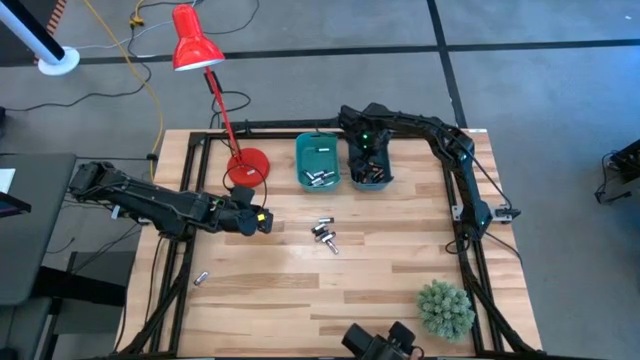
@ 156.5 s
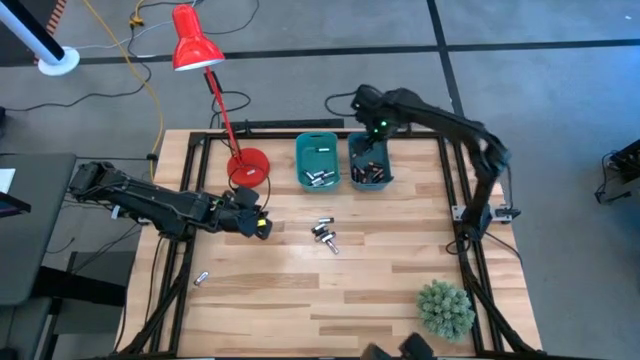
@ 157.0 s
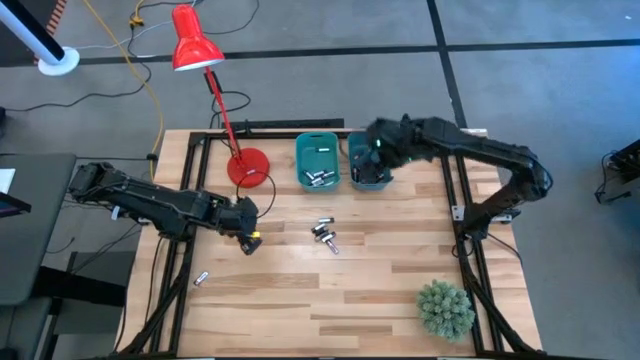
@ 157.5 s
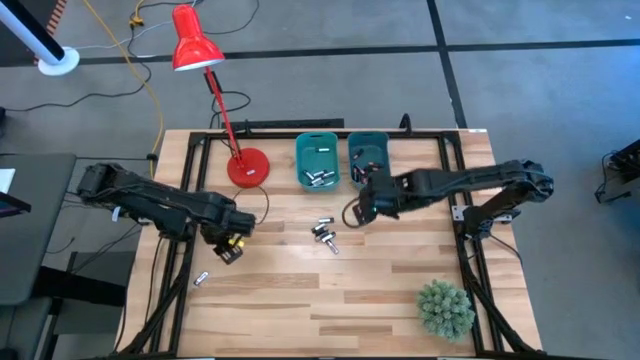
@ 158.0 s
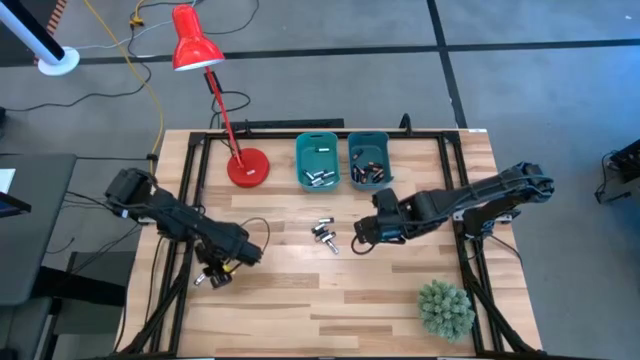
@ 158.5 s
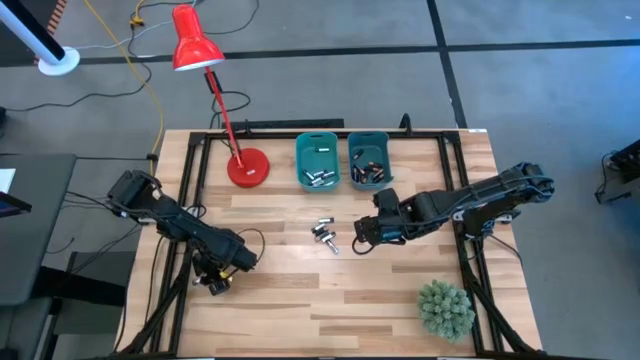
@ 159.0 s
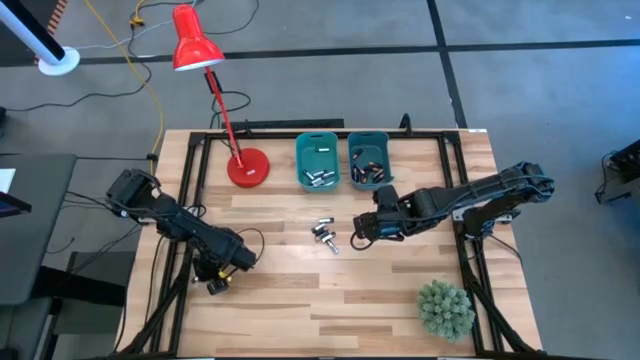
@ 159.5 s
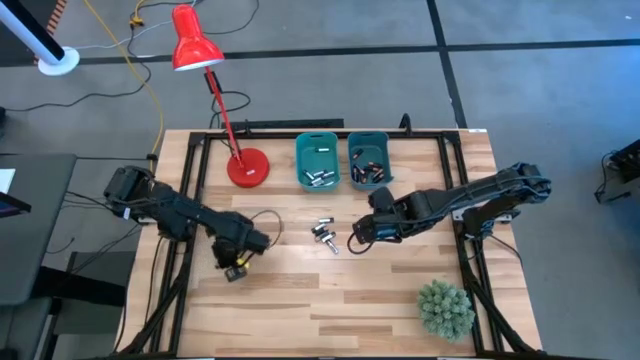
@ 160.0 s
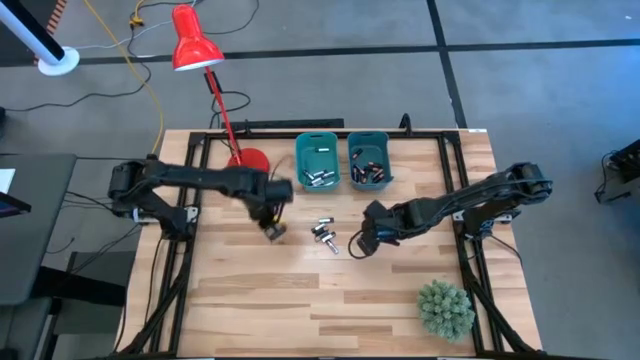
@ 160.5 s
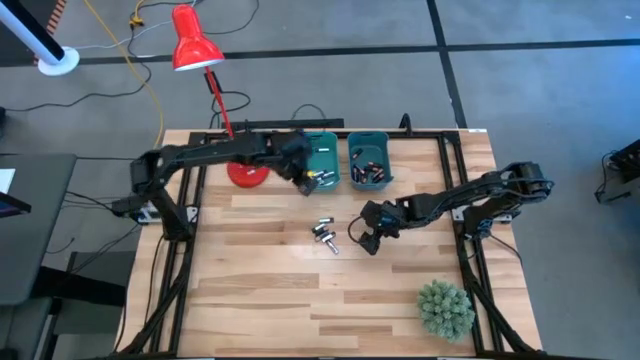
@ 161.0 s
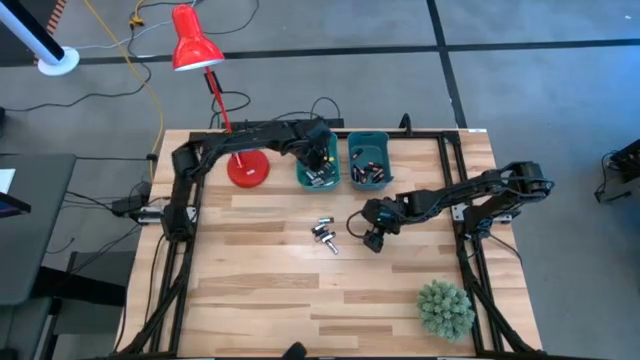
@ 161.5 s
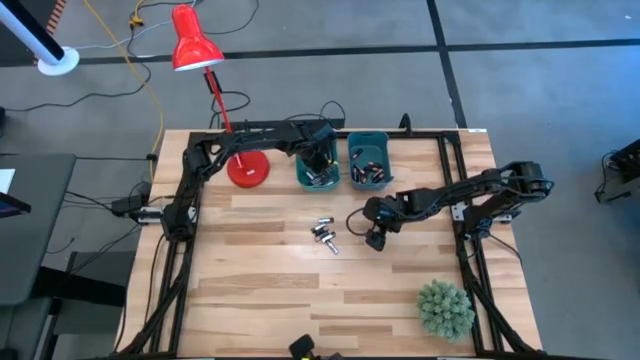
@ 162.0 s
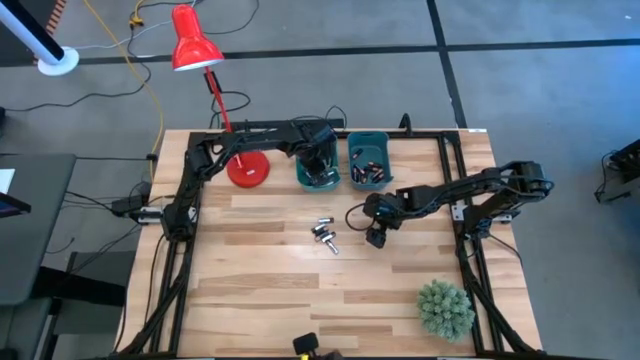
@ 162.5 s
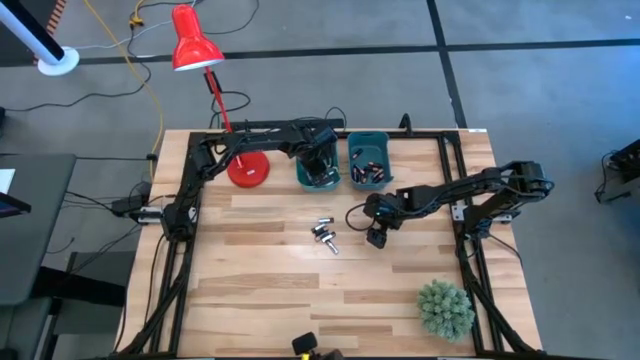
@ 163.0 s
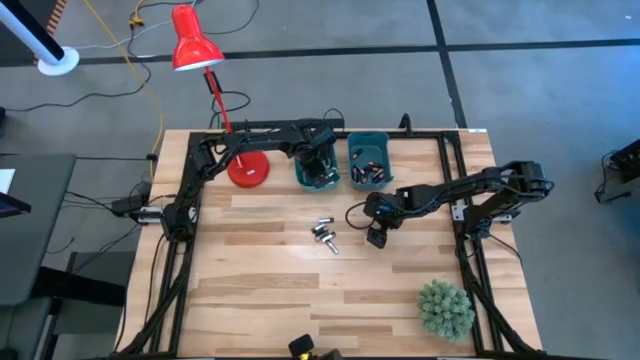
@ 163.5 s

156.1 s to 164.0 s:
Task: Sort batteries
Put the silver battery into the green bin

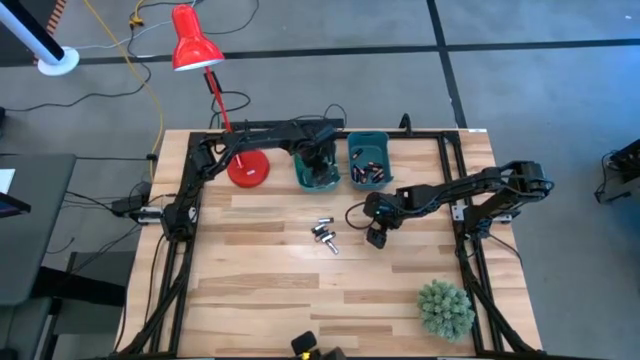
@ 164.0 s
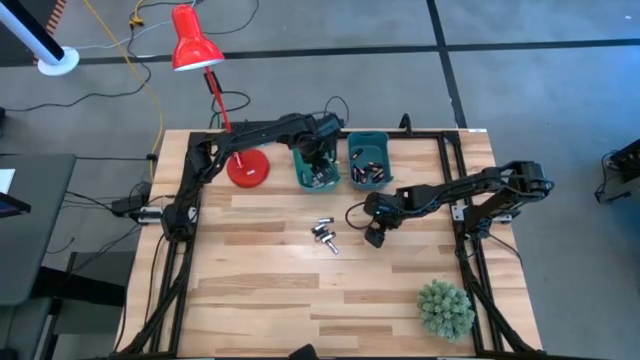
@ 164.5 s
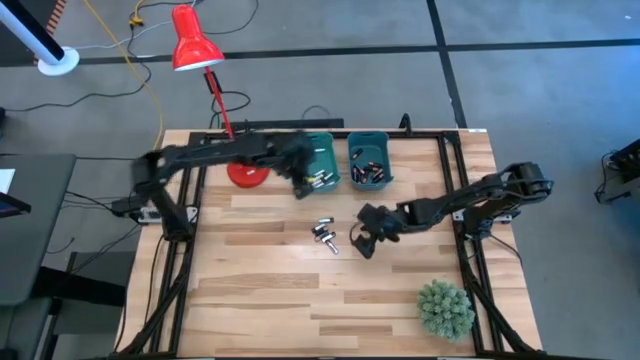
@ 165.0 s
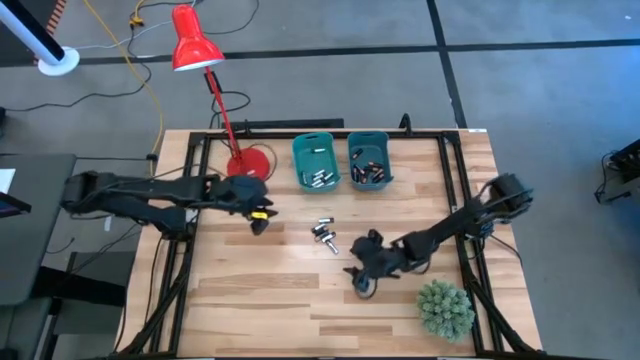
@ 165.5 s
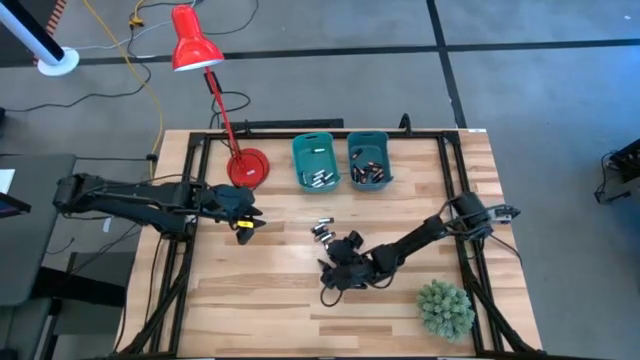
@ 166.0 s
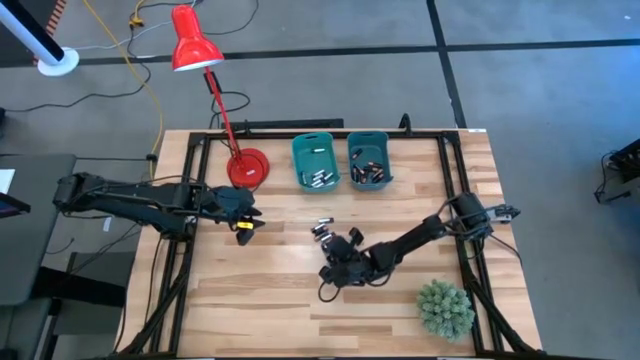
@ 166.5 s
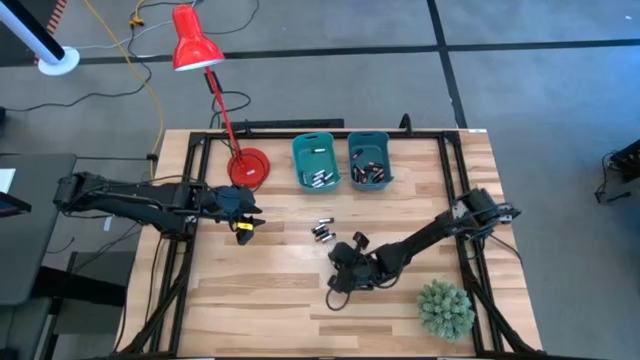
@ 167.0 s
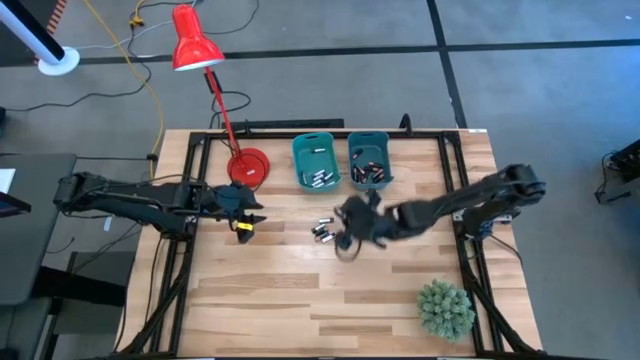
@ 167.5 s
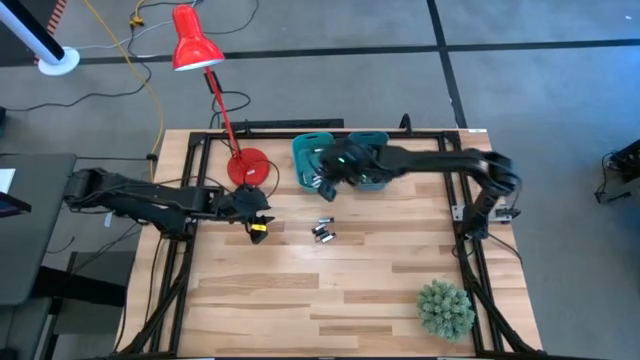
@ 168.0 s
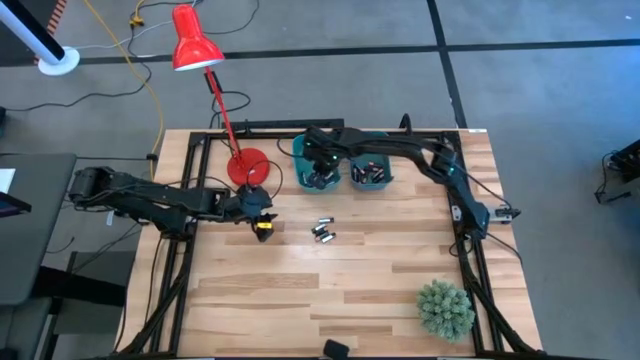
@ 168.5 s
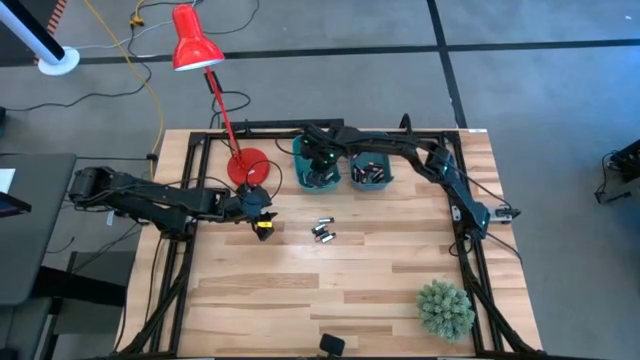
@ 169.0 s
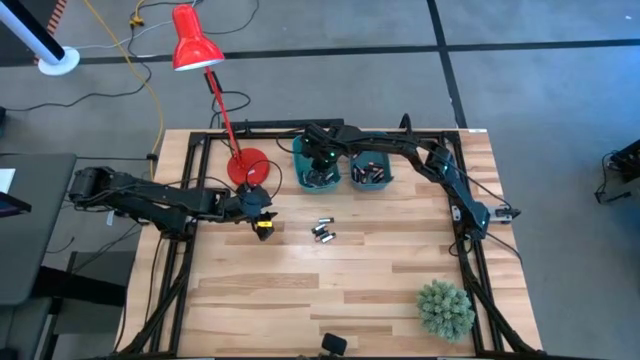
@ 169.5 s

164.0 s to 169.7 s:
Put the silver battery into the green bin

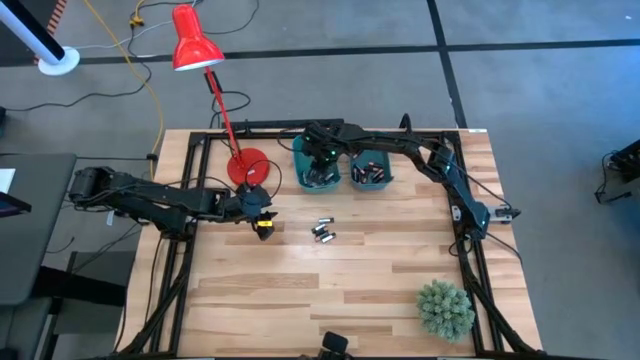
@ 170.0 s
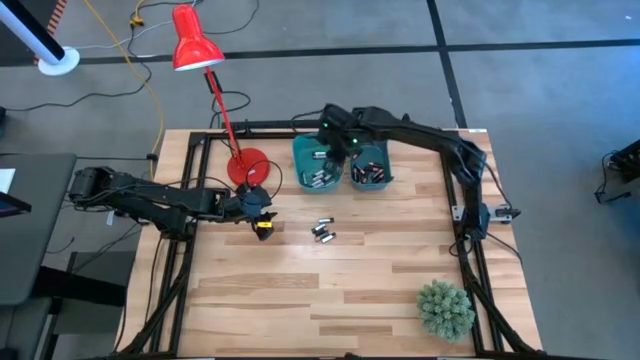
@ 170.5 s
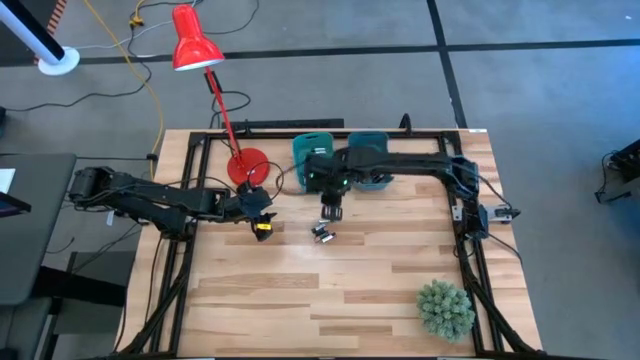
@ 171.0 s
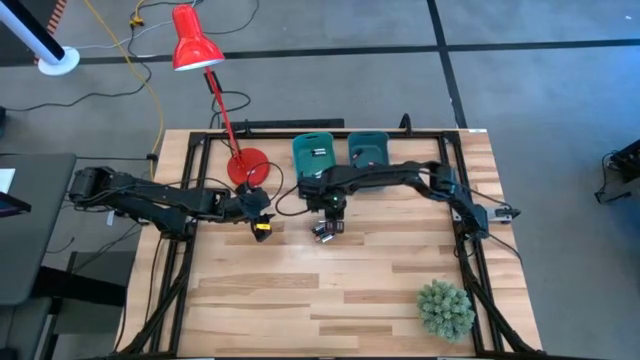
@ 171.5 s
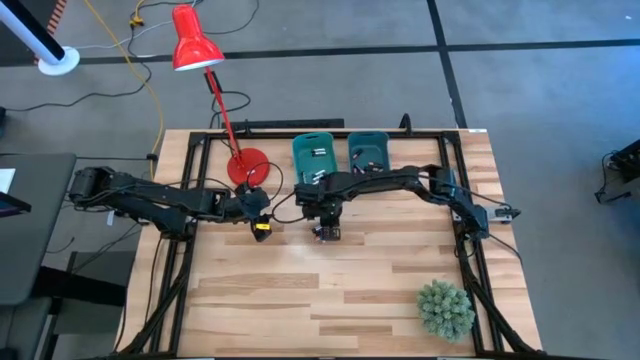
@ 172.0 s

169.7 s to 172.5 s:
Put the silver battery into the green bin

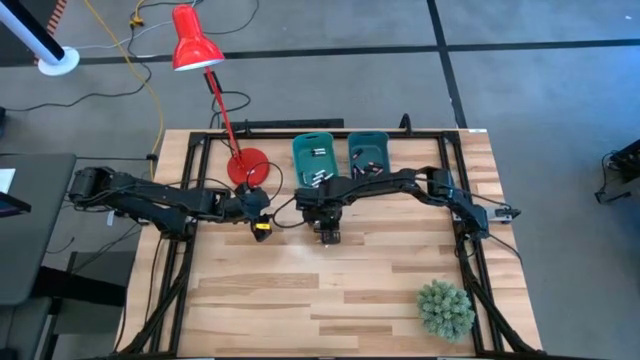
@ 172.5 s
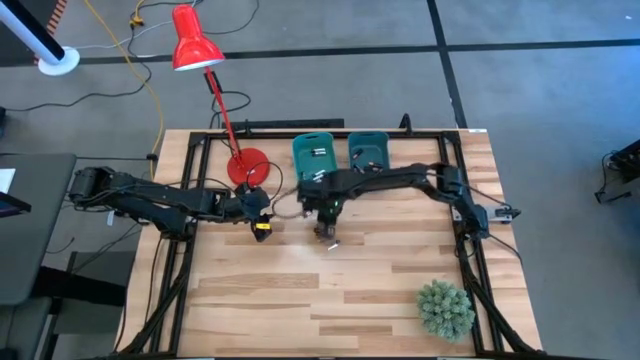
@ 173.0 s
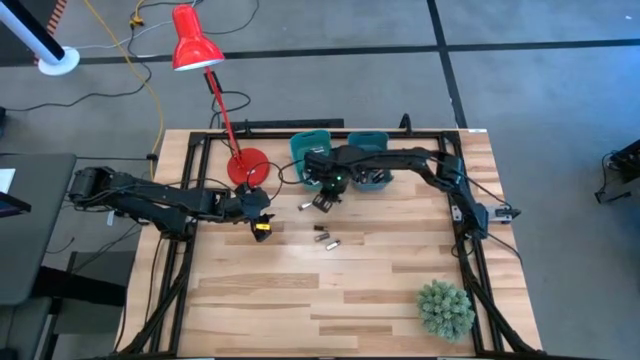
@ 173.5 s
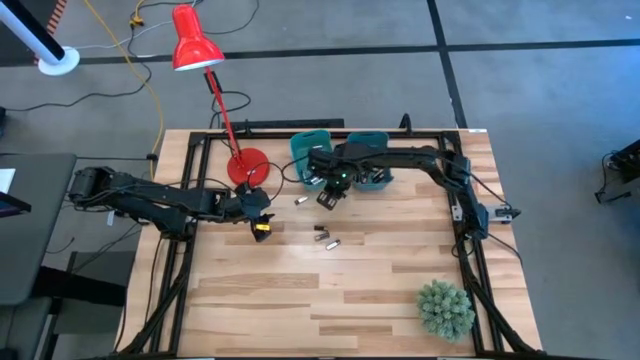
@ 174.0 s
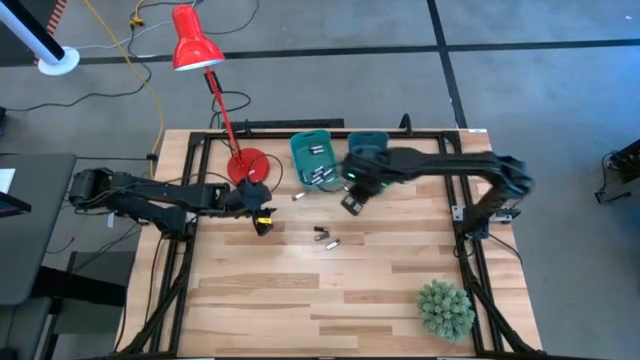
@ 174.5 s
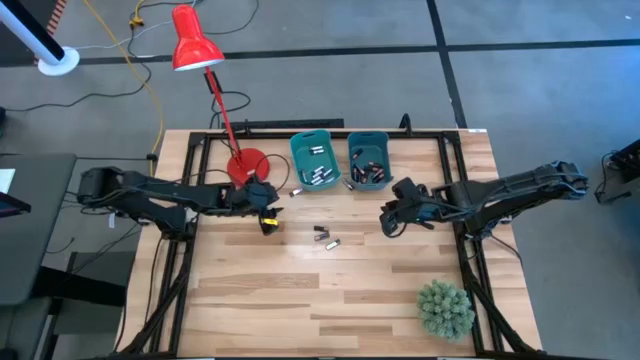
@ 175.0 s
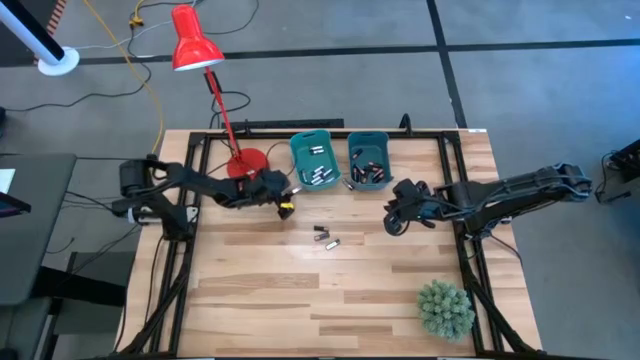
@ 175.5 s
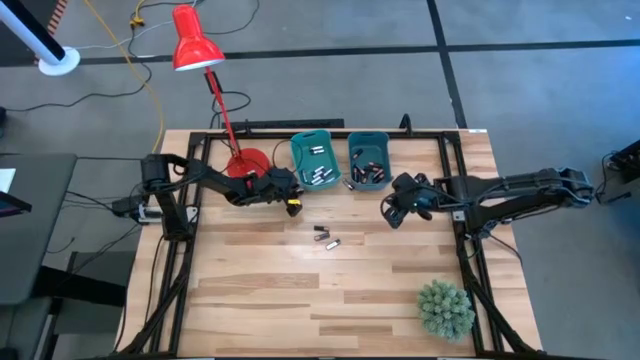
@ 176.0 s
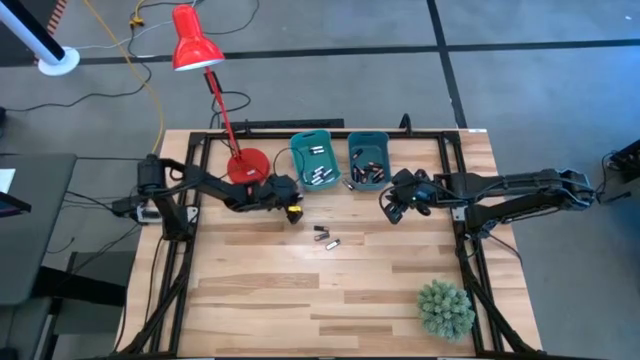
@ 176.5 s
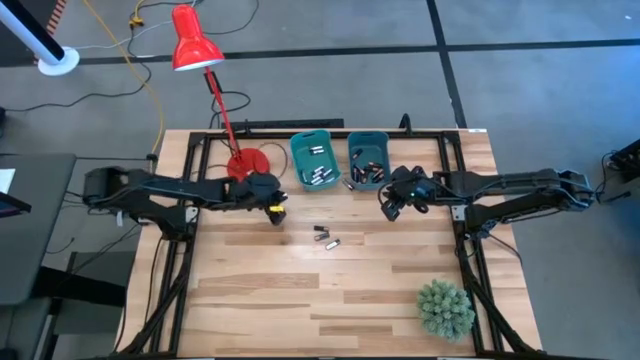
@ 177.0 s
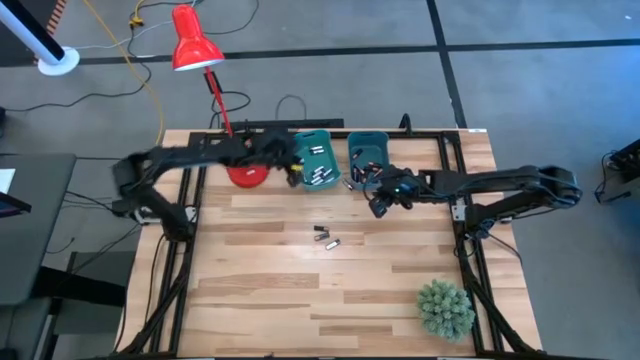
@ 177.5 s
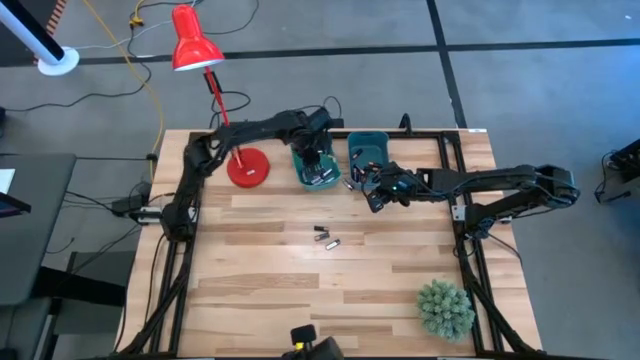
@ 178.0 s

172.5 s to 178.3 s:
Put the silver battery into the green bin
